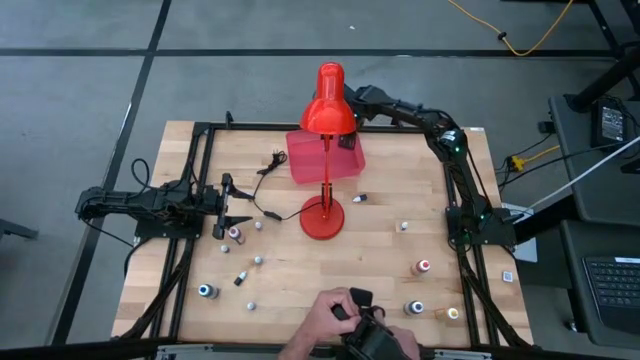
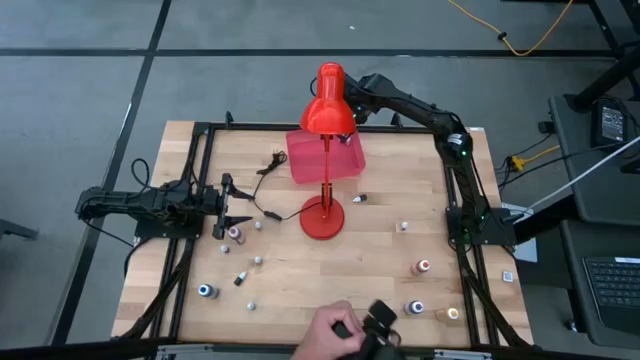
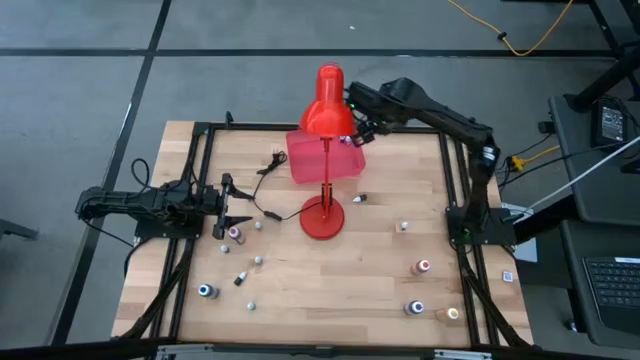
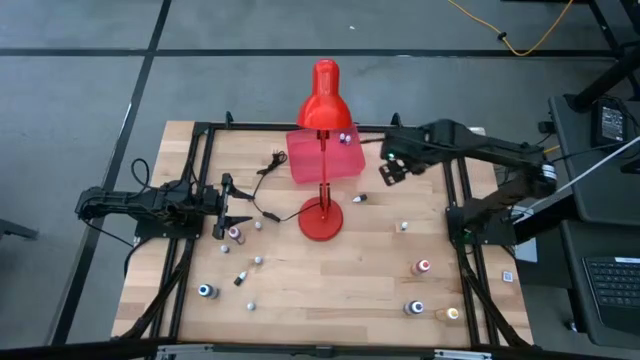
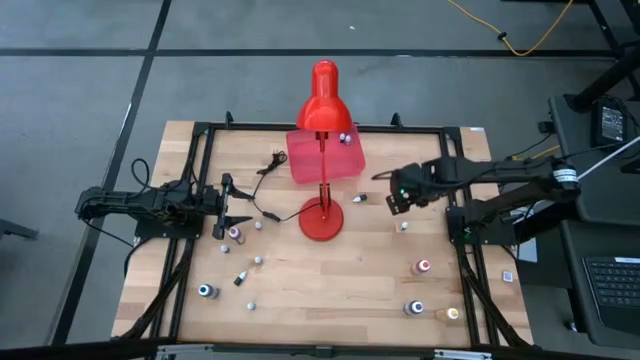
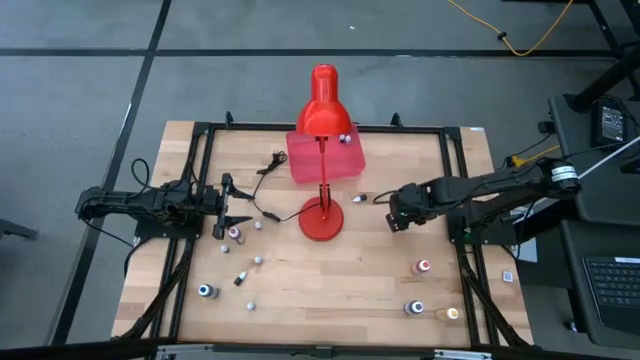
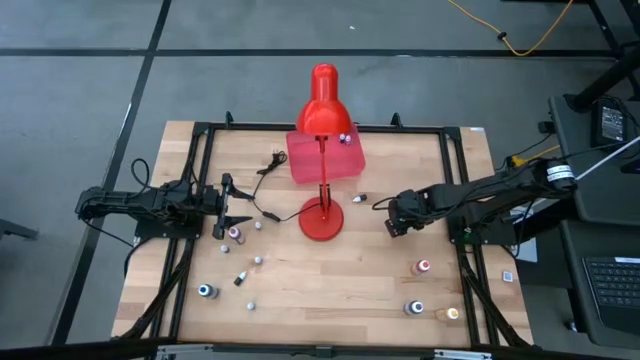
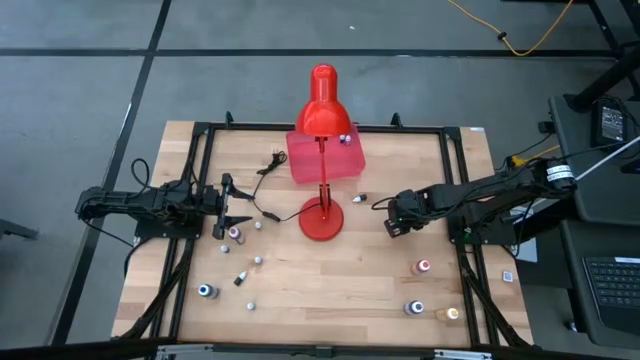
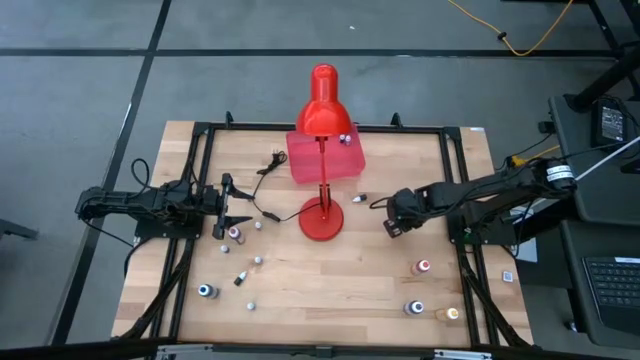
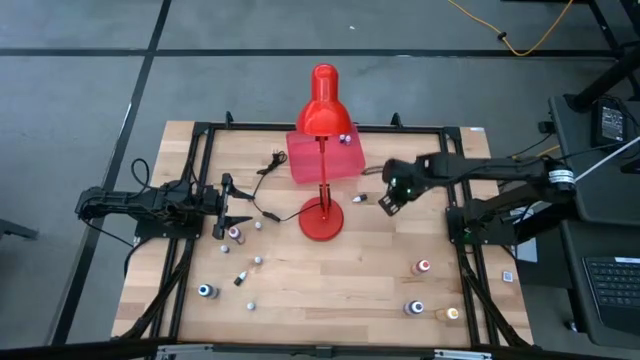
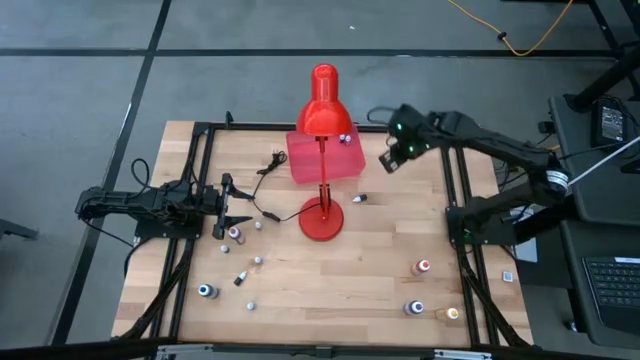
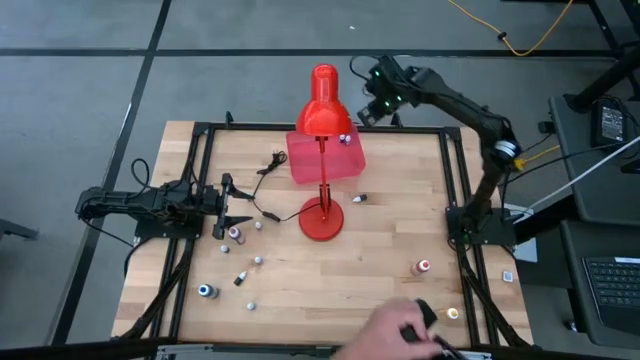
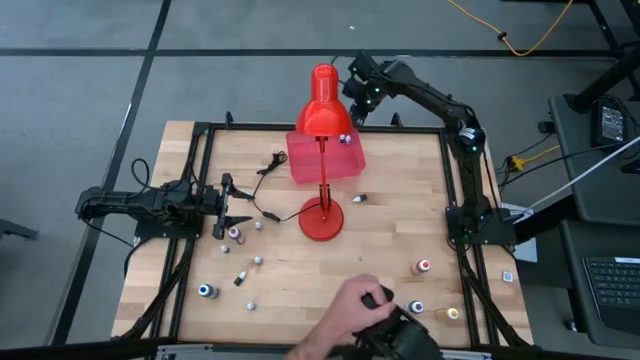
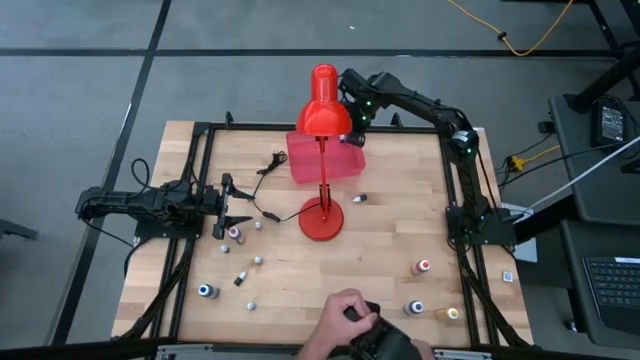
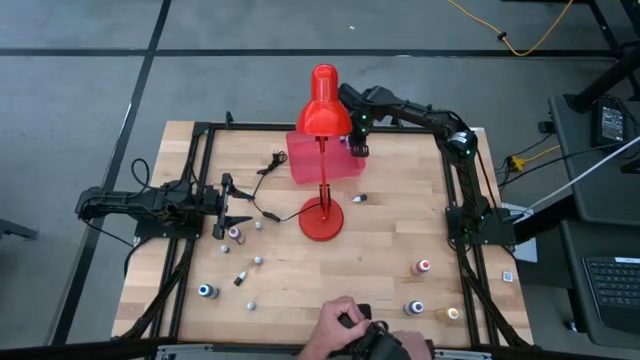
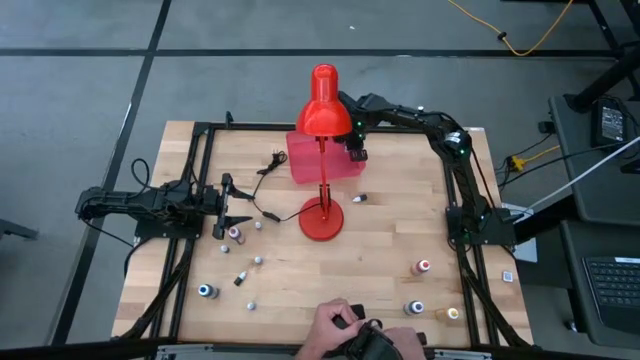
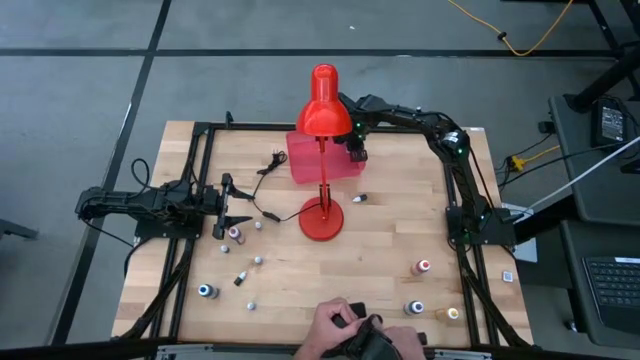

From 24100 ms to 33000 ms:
Task: Pick & Place food coloring
Put the small green food coloring bottle into the red bin

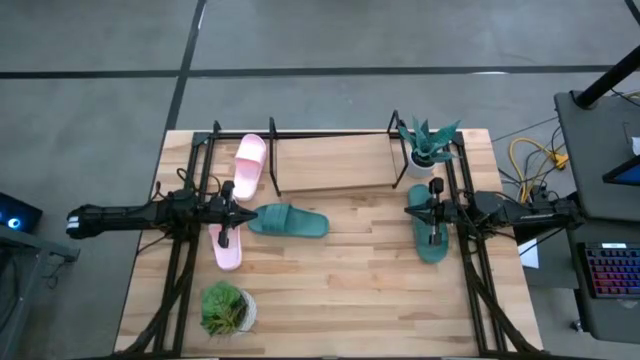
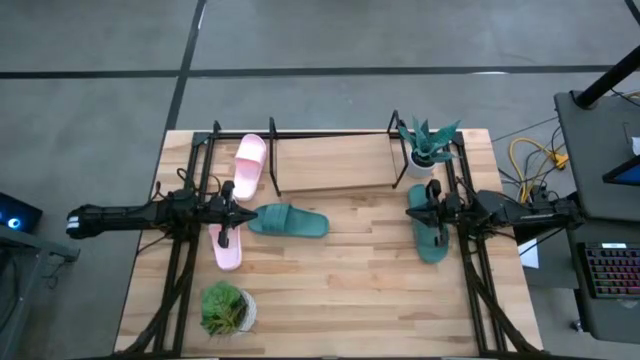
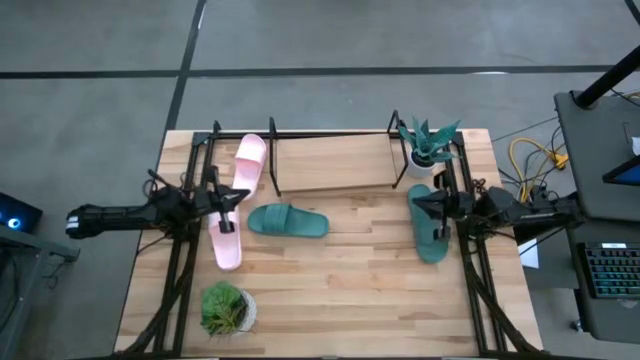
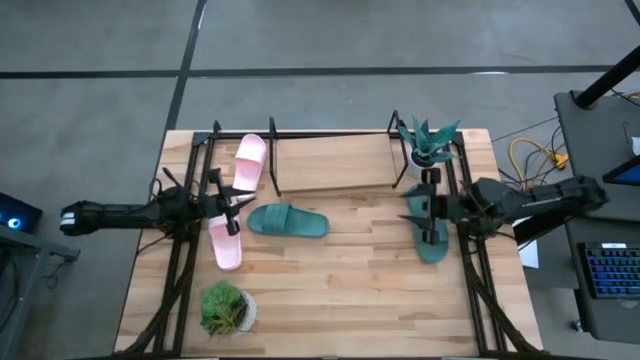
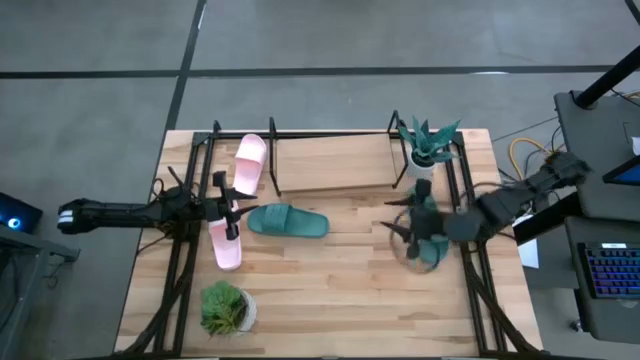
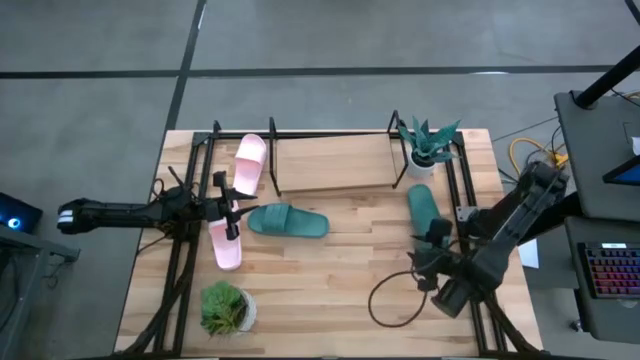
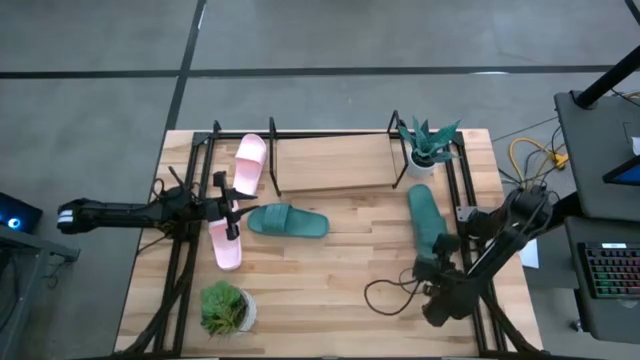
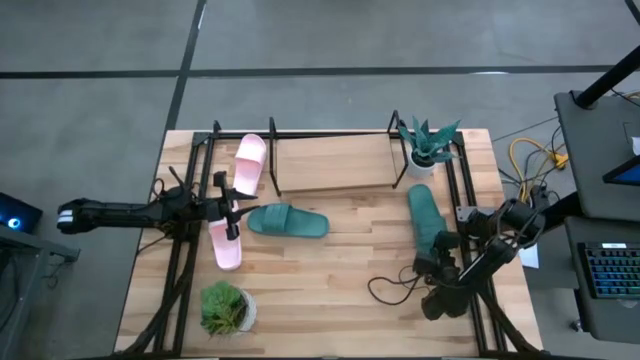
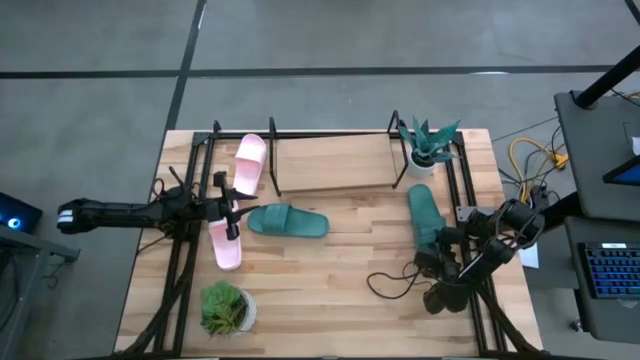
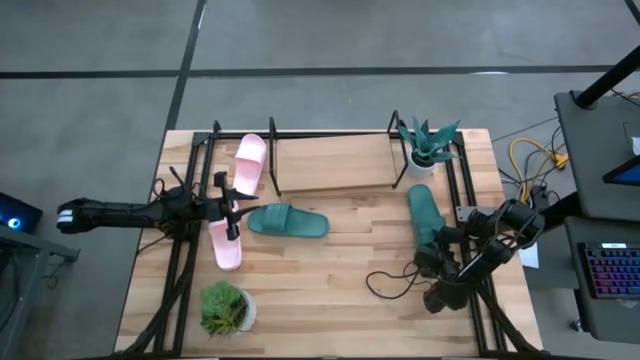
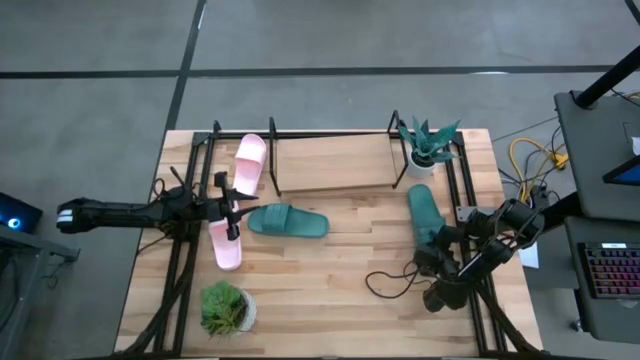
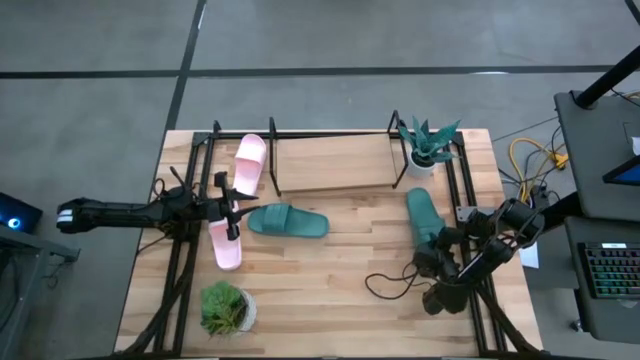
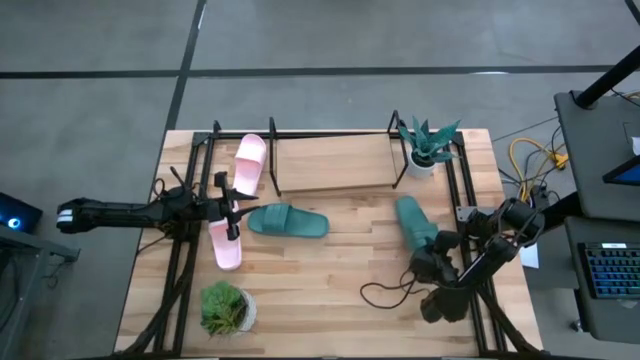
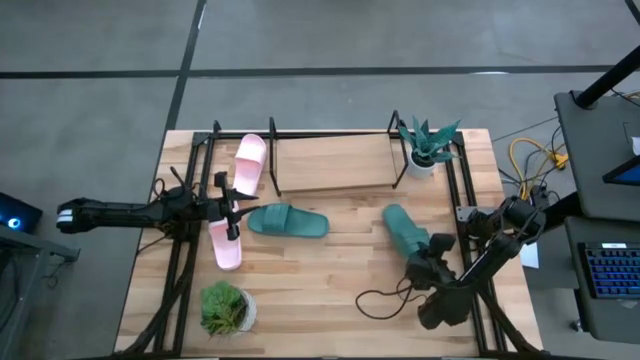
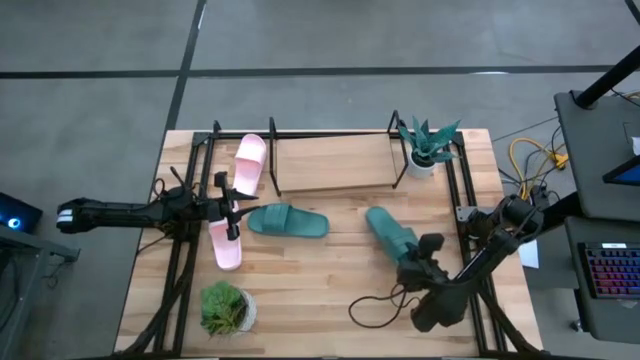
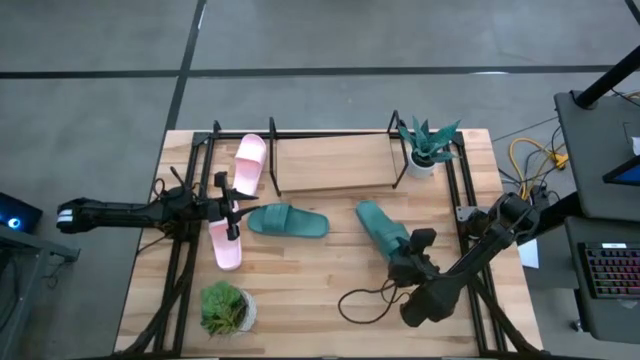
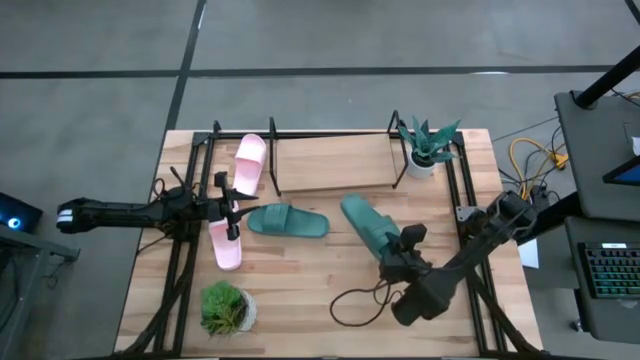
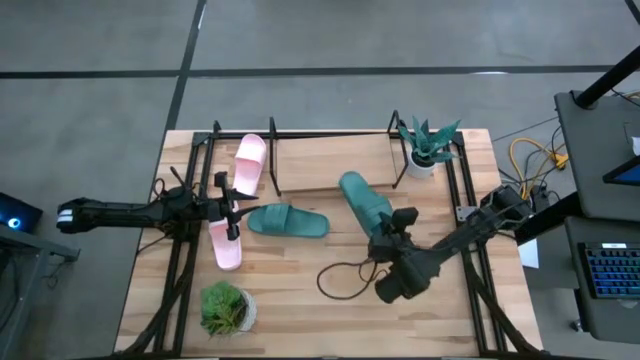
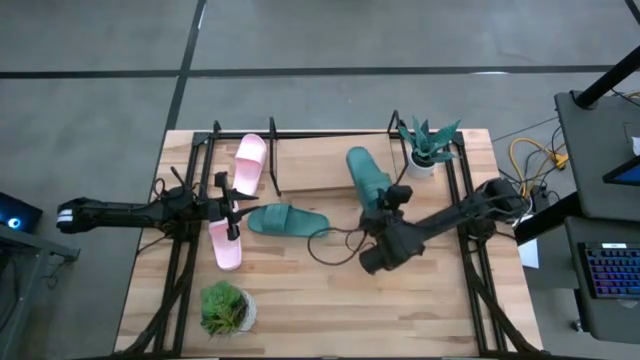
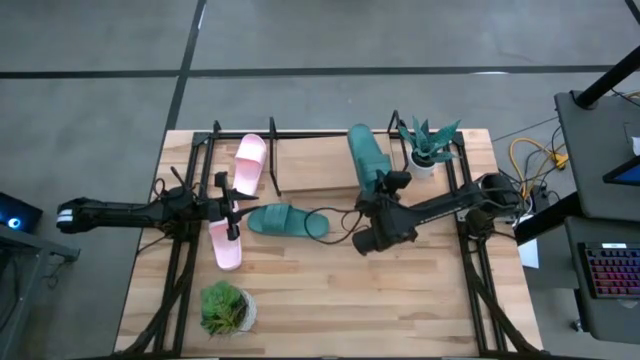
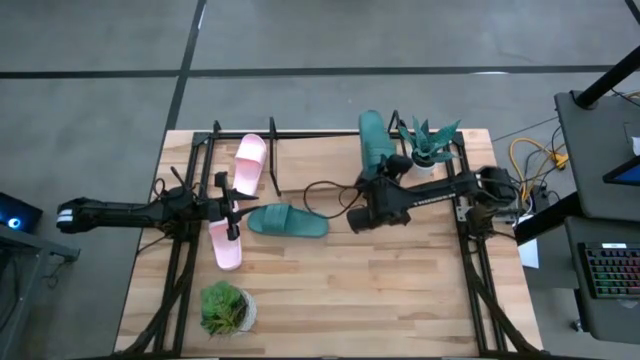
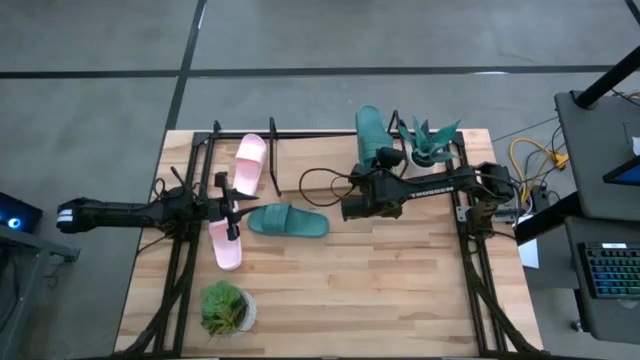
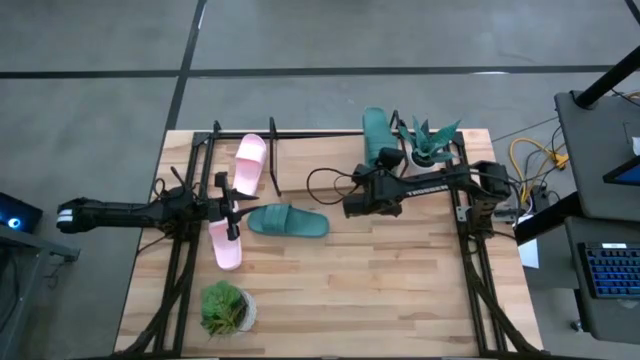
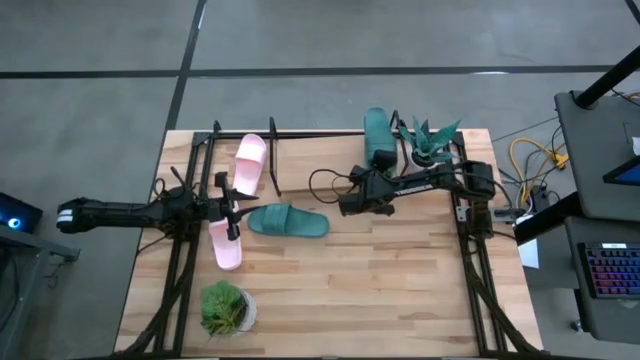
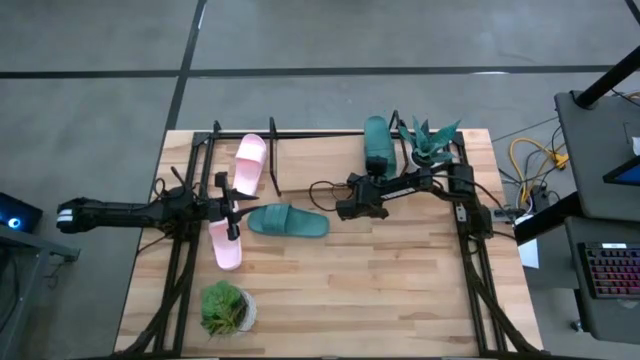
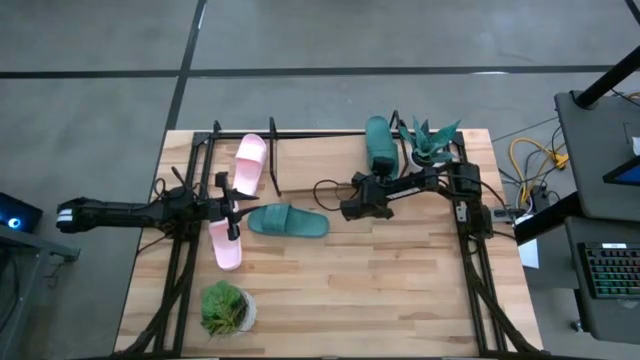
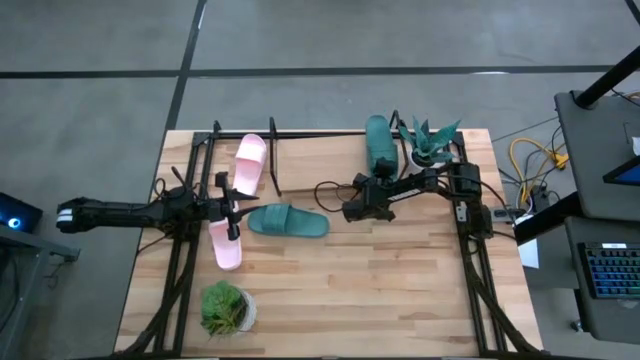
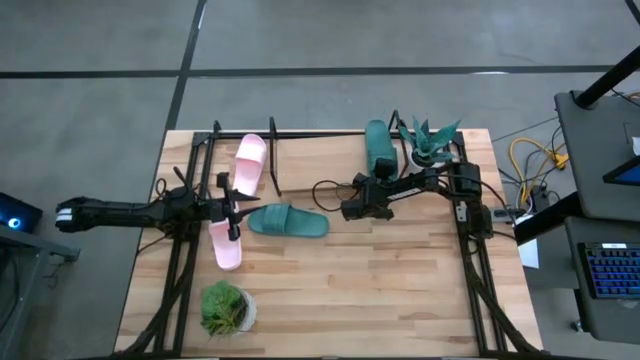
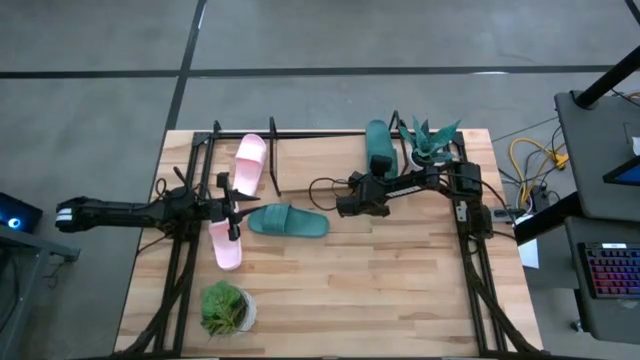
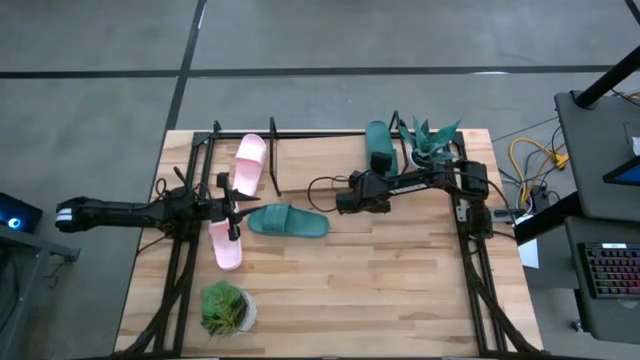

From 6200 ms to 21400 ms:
Task: Pick and place slides into the shelf
Put the right green slide on the shelf
